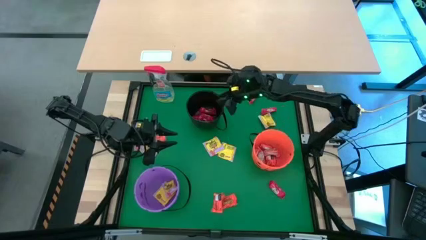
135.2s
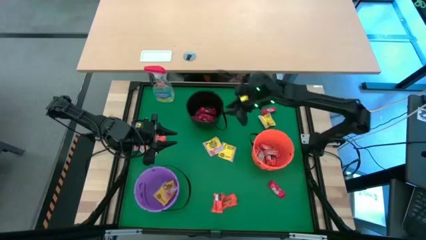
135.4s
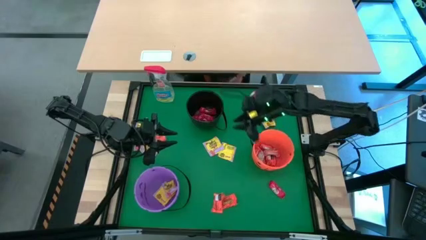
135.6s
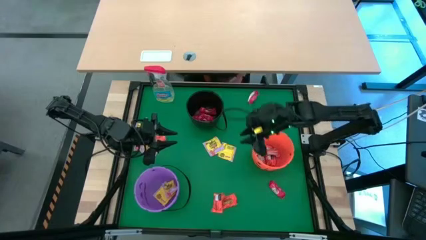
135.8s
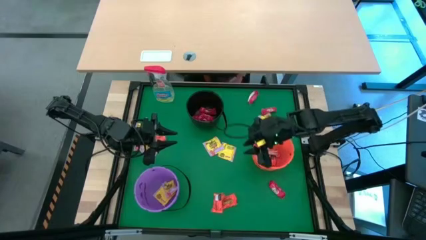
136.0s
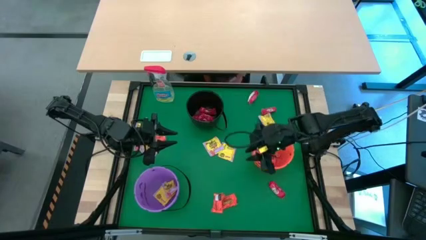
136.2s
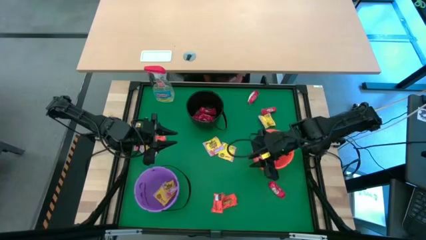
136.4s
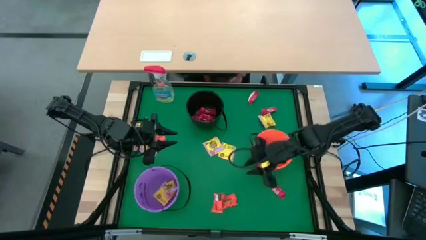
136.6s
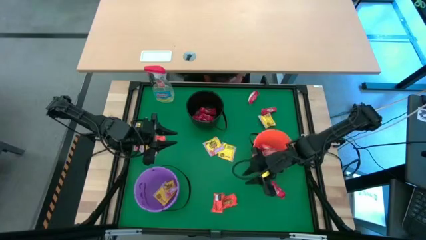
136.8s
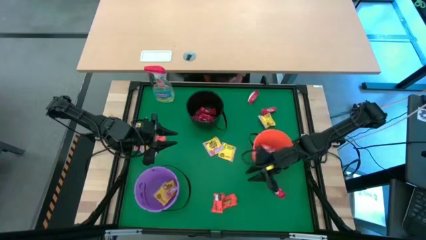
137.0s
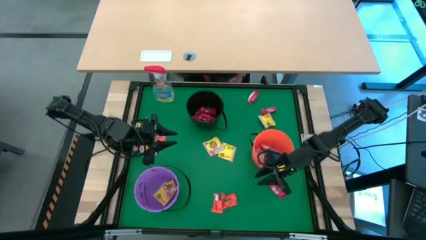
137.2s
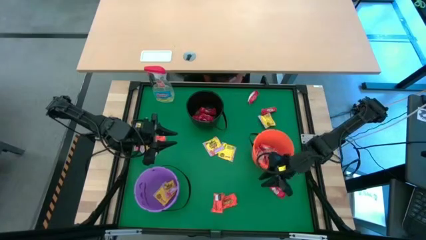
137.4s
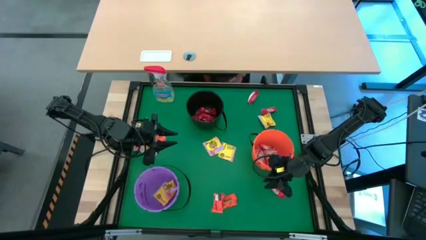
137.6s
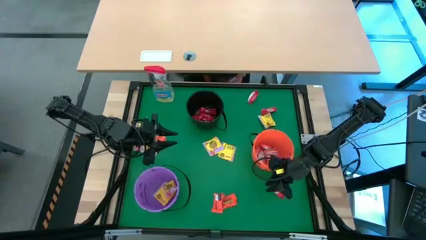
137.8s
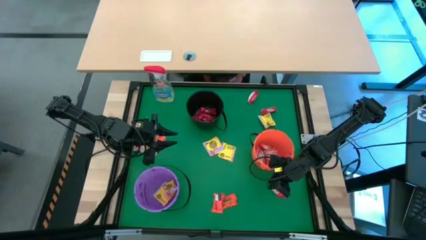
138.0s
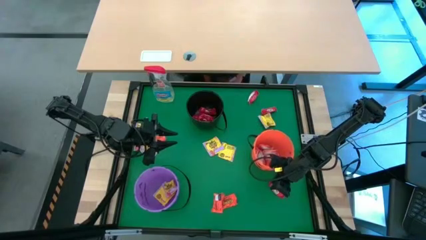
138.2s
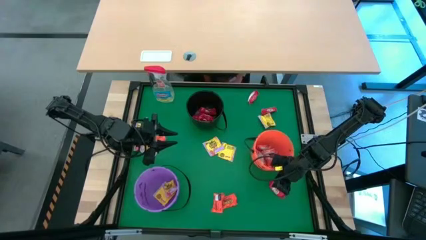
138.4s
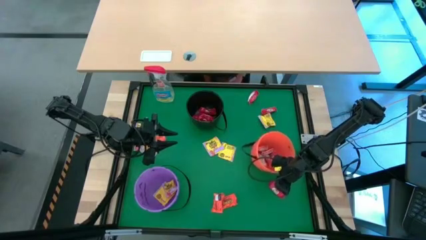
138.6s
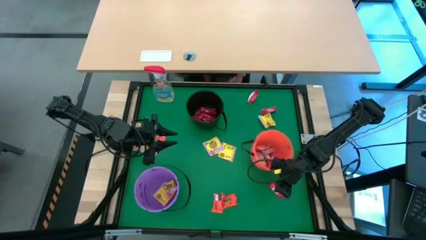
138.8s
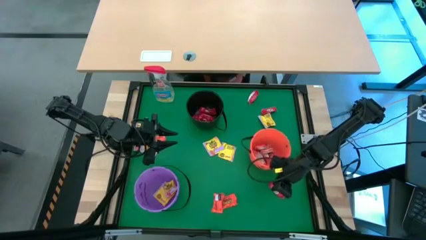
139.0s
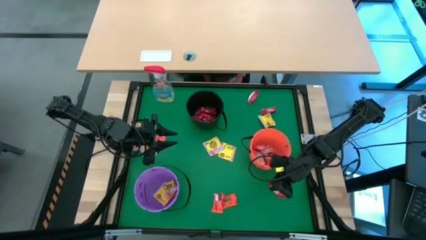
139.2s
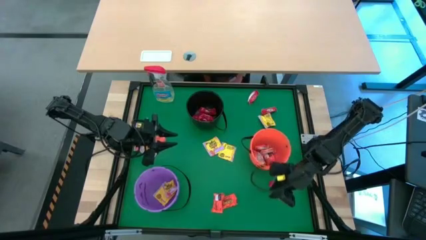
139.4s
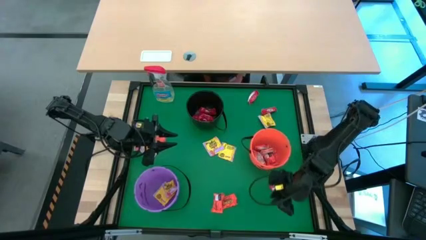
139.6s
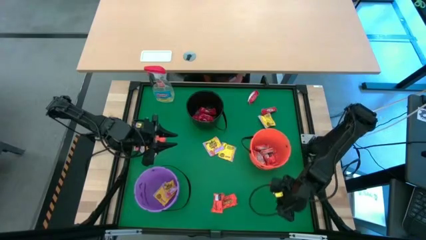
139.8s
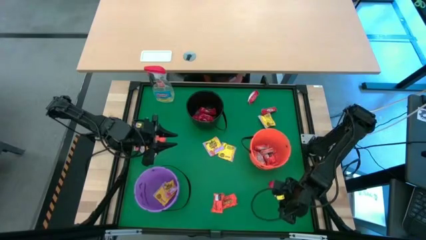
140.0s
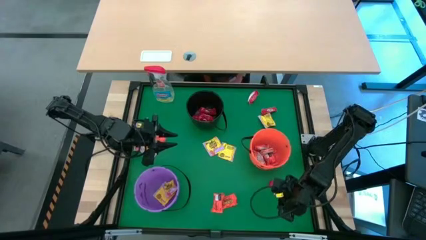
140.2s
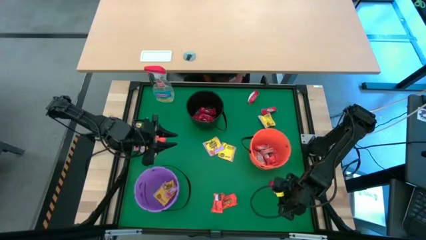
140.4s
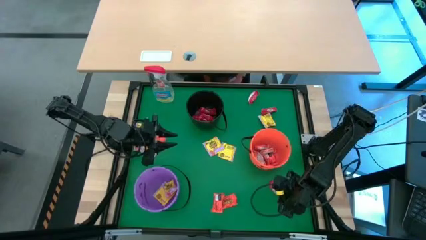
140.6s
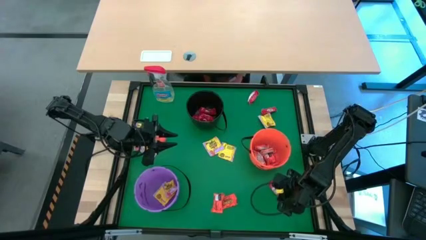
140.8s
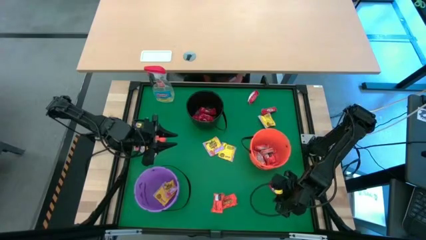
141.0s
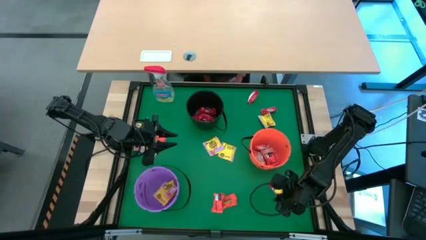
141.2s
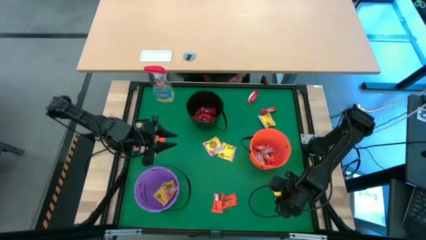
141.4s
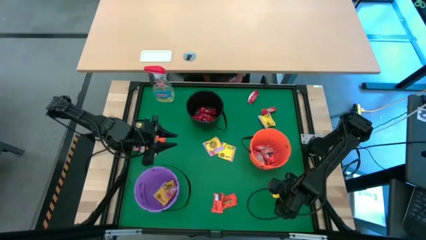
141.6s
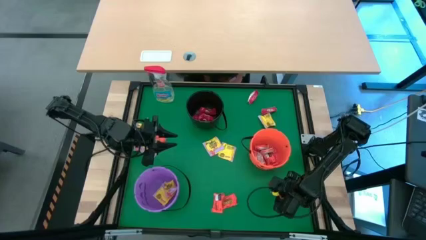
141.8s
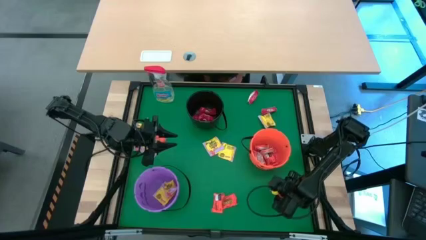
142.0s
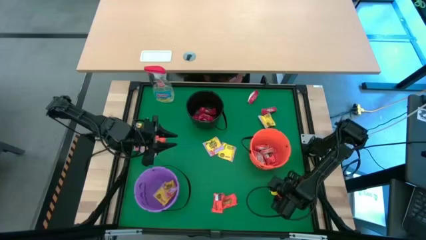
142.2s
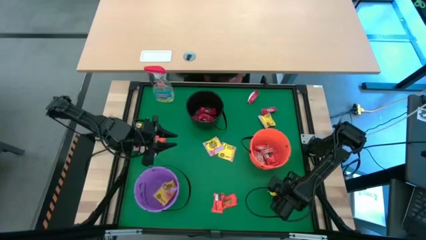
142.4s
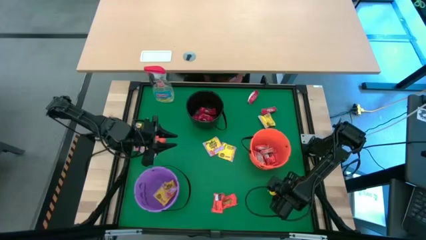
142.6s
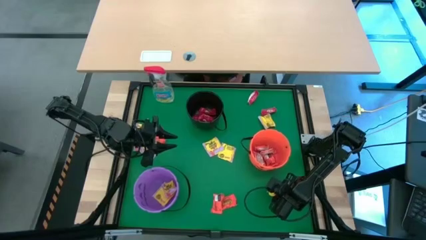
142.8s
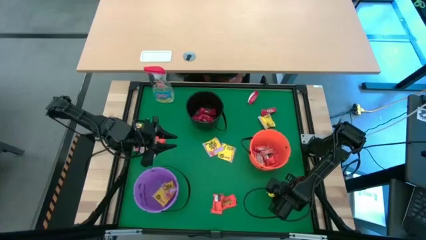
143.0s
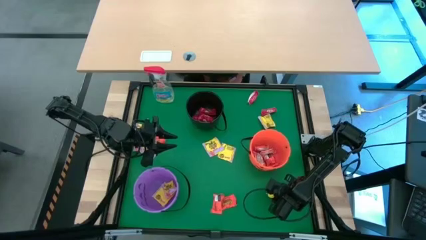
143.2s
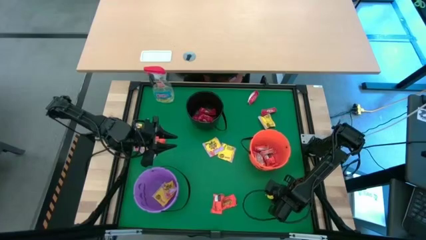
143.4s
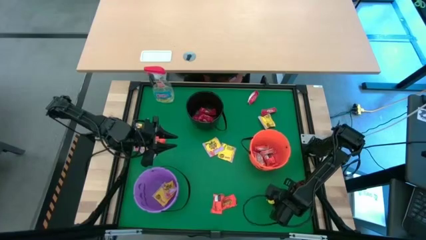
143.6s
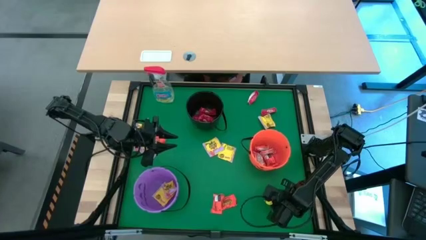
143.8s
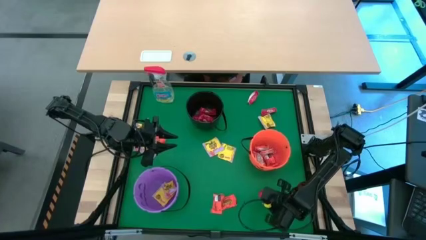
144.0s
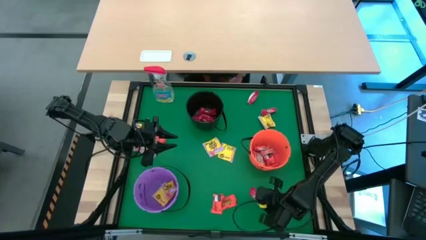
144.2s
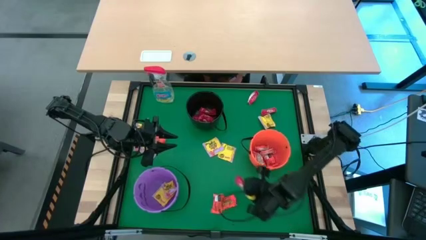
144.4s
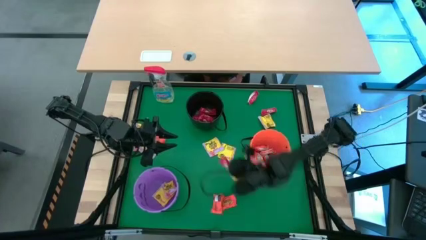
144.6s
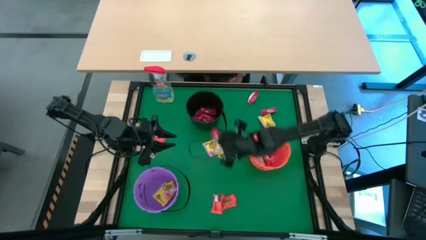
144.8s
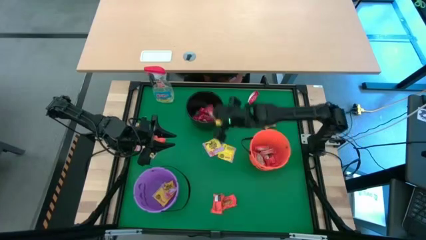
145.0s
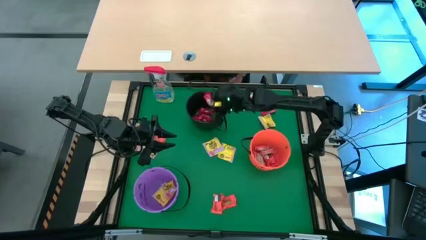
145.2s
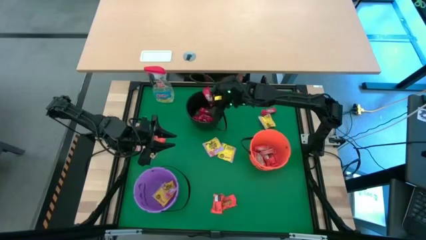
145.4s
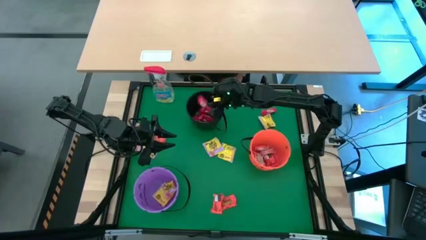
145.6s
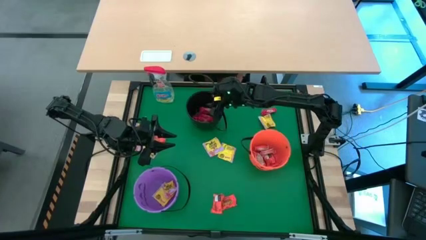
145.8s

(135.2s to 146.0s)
Task: Sort candy
Put the red candy into the black bucket

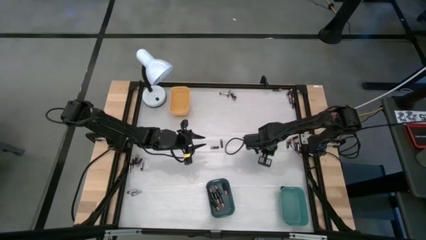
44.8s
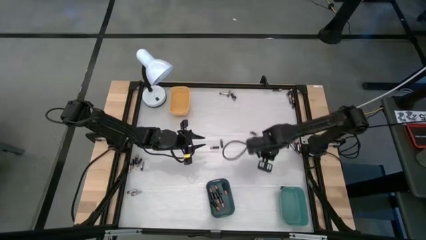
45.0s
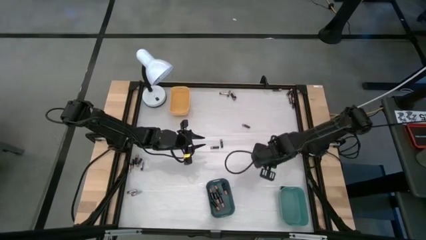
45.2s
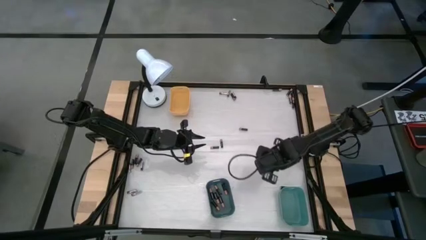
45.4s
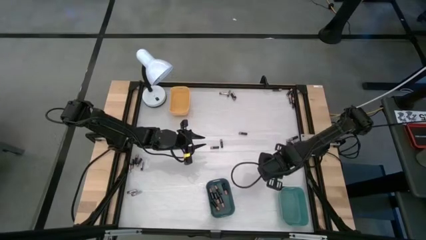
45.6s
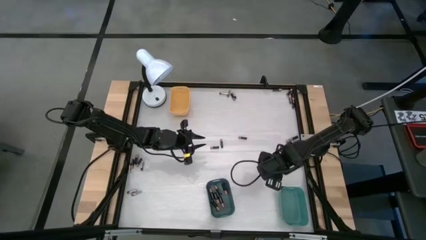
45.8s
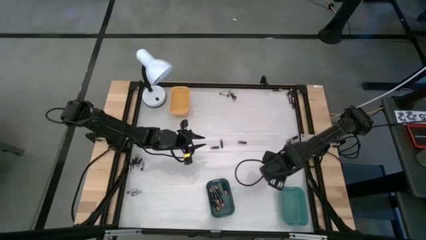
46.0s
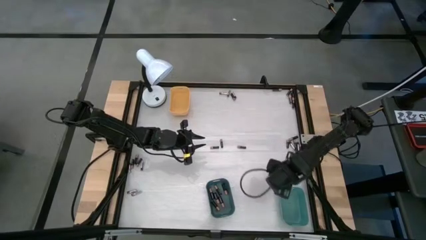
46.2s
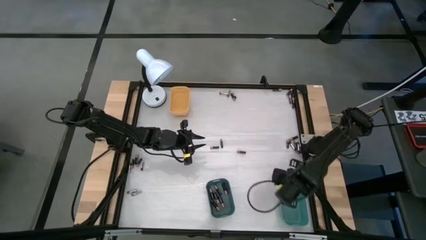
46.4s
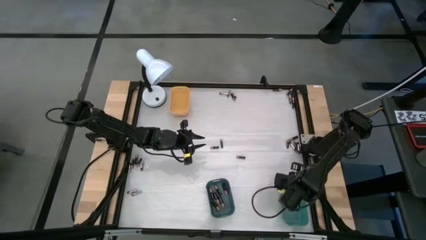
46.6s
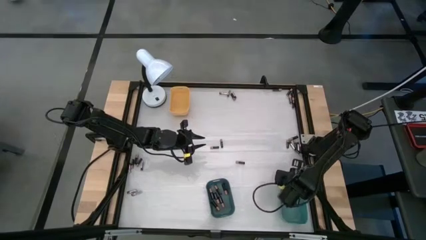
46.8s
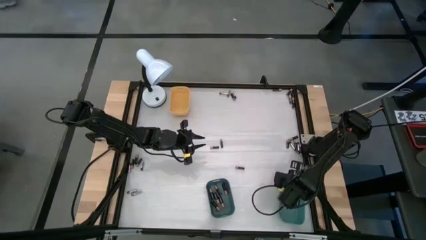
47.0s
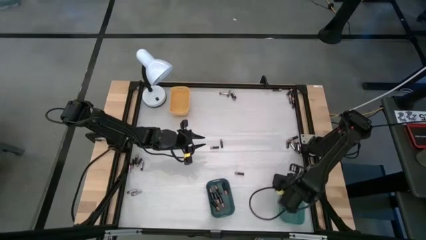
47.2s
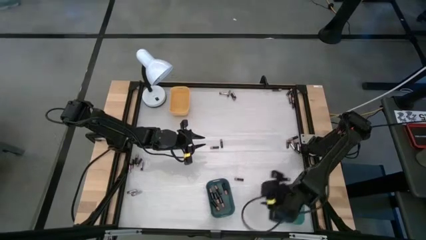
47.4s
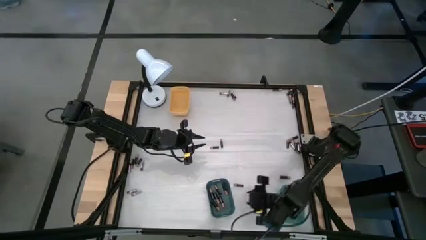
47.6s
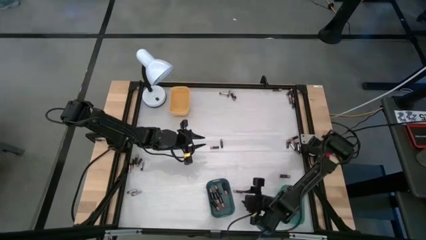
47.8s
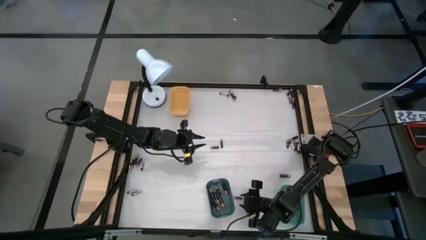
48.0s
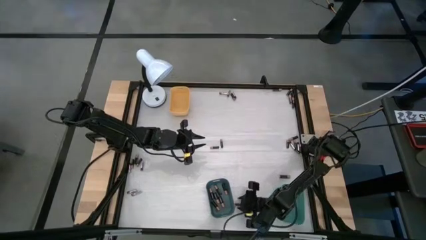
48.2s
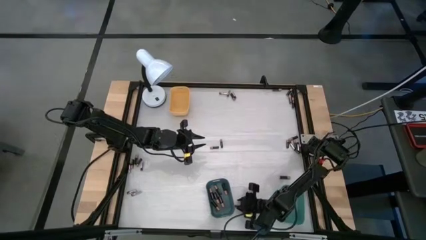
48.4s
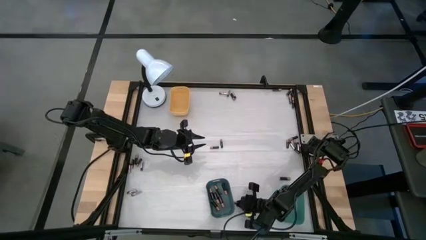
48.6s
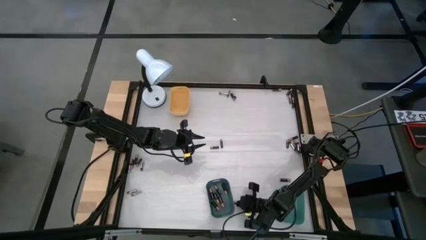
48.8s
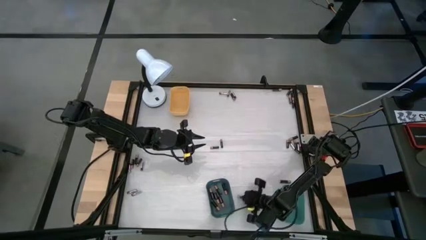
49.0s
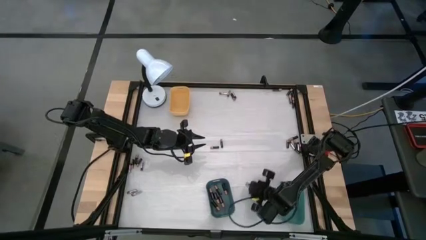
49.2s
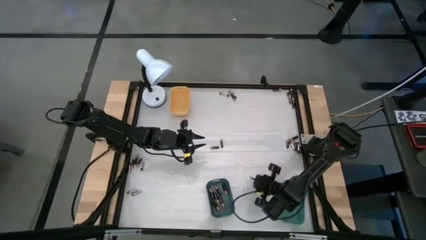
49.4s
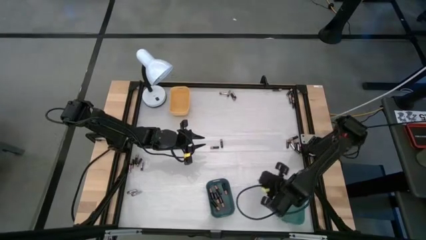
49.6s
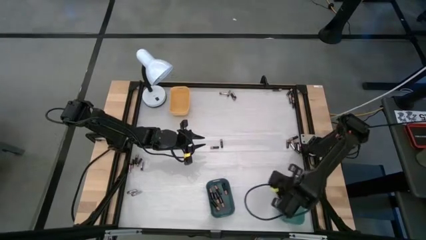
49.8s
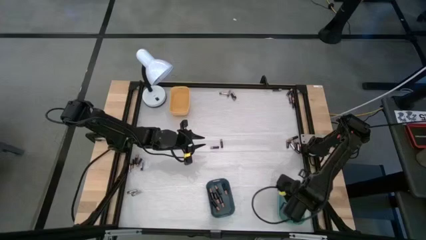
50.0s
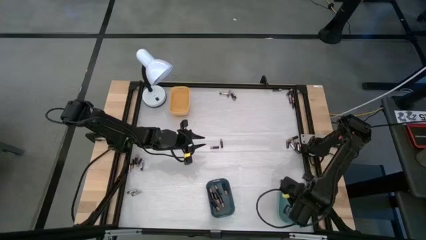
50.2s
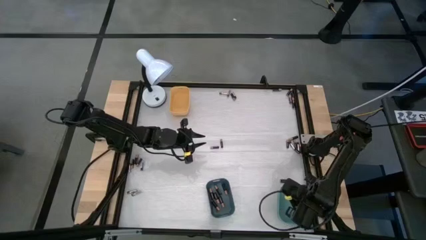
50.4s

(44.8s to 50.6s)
Task: Sort batteries
Put the black battery into the blue bin
